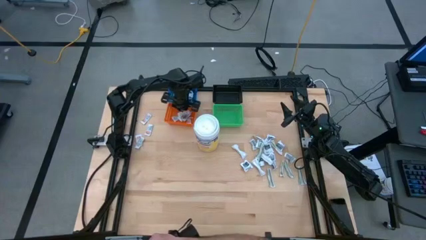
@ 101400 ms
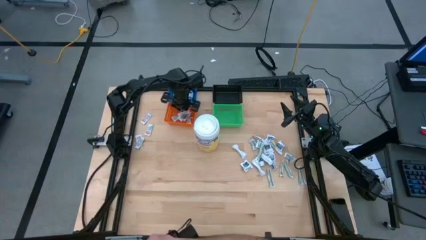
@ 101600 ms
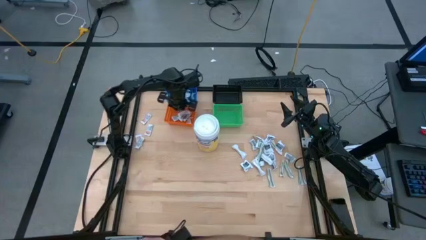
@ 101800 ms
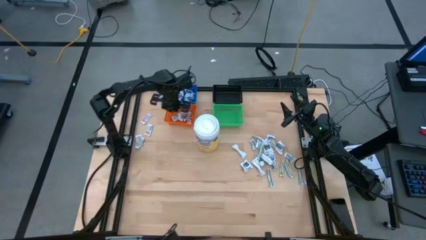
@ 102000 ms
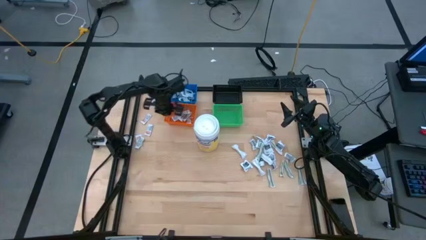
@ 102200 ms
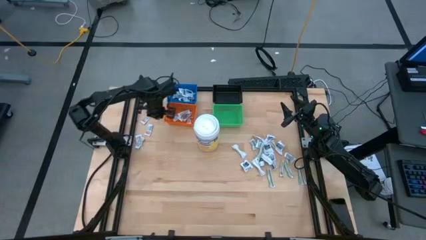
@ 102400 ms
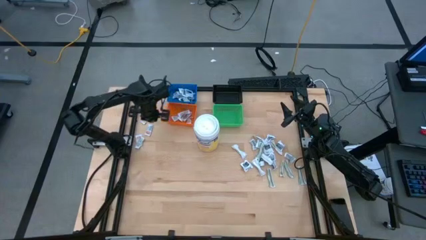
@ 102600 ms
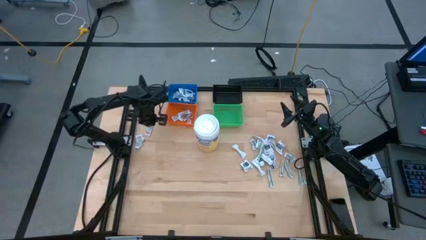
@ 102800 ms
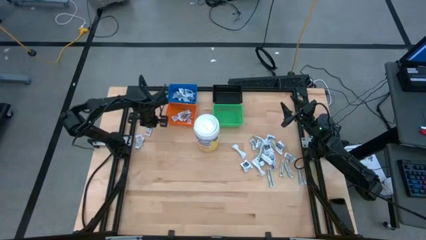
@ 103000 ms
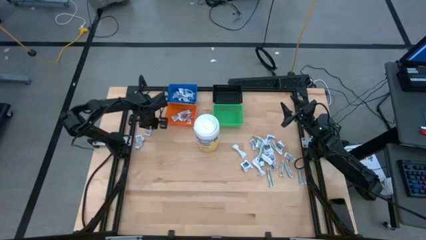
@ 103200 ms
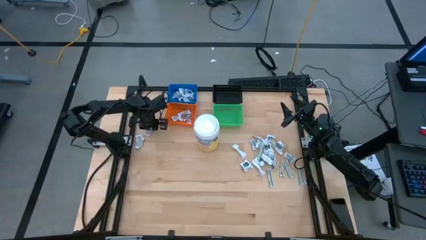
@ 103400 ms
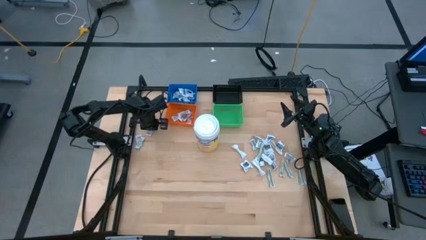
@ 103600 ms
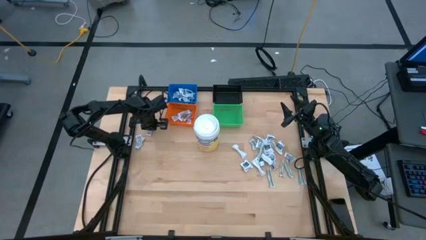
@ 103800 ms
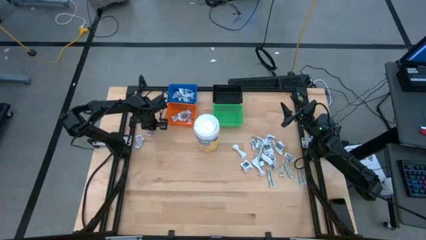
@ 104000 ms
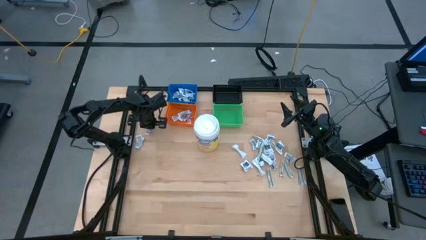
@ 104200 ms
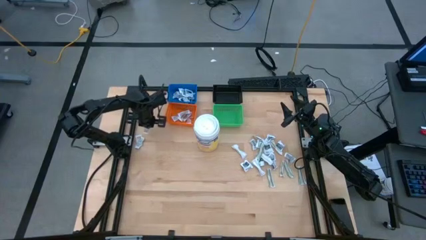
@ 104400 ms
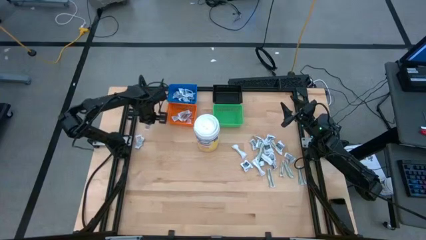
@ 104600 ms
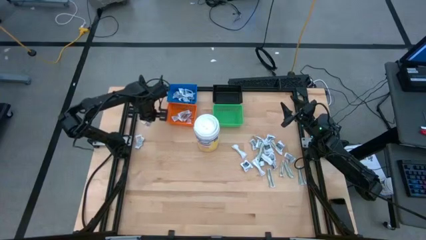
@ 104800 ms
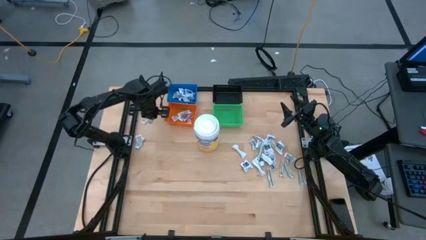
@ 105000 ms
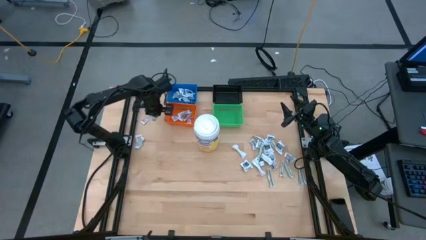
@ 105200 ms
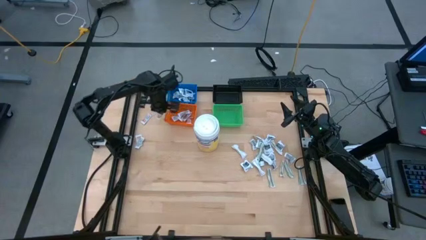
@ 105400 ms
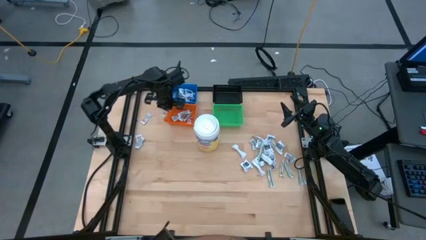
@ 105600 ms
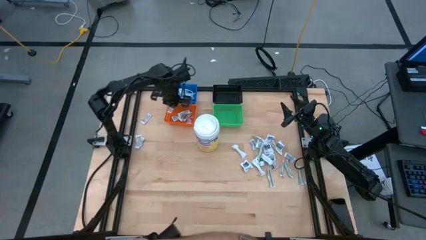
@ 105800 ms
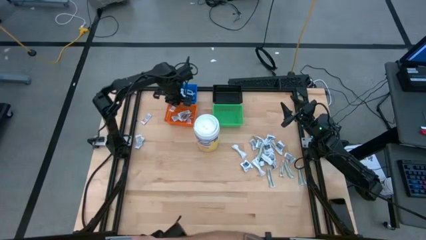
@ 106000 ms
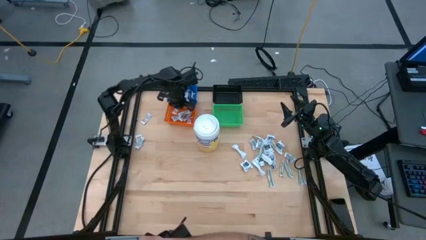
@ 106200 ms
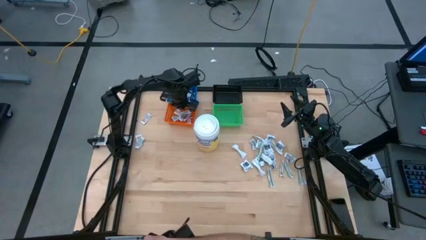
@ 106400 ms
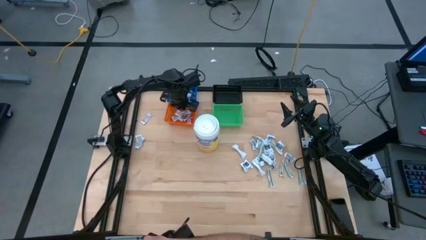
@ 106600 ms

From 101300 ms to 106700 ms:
Task: Pick & Place First Aid Supplies
Put the orange ointment pack into the orange bin

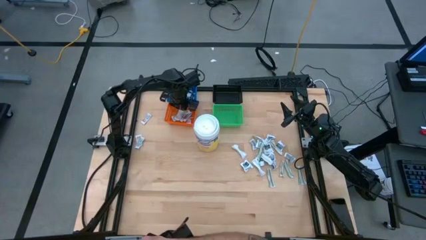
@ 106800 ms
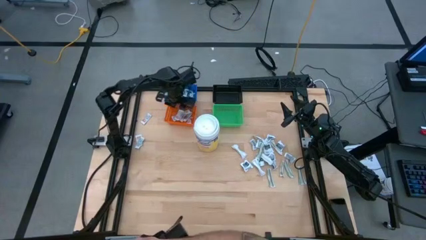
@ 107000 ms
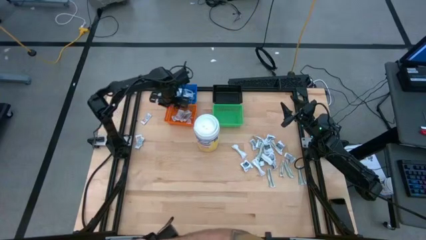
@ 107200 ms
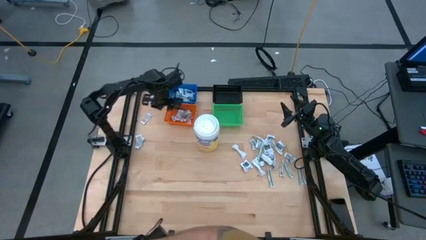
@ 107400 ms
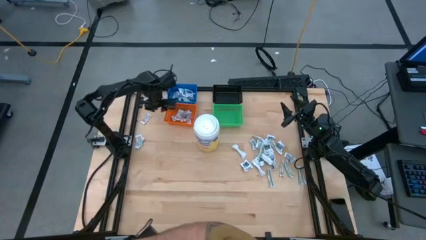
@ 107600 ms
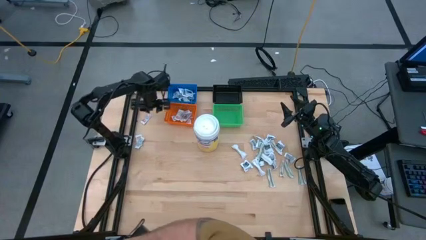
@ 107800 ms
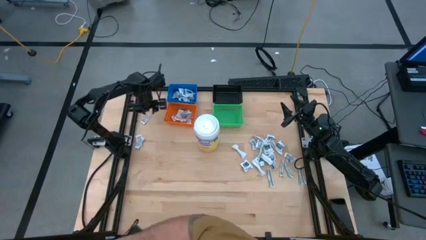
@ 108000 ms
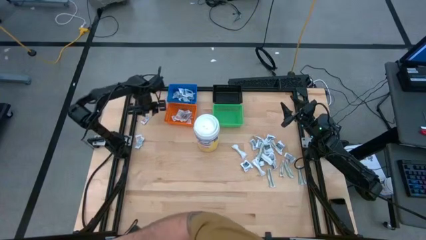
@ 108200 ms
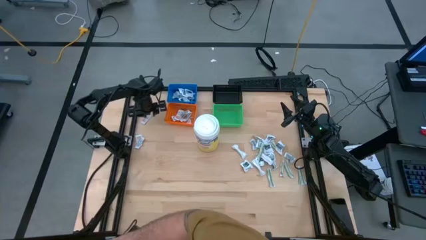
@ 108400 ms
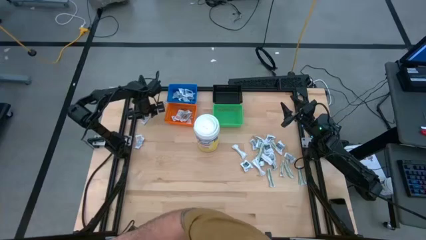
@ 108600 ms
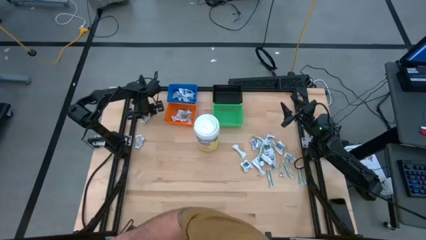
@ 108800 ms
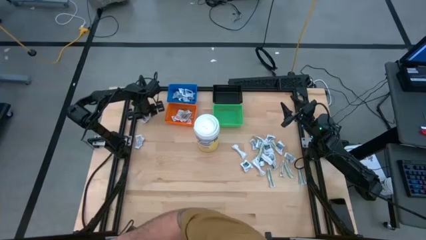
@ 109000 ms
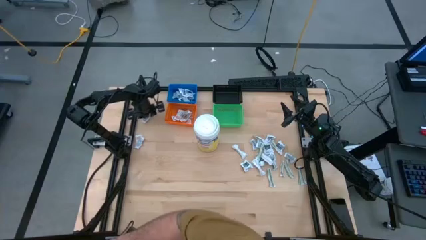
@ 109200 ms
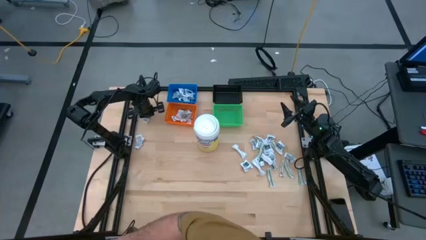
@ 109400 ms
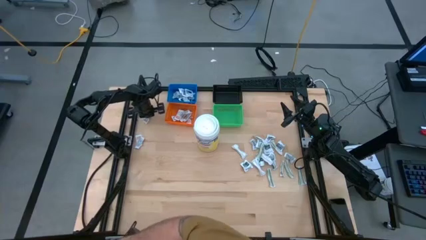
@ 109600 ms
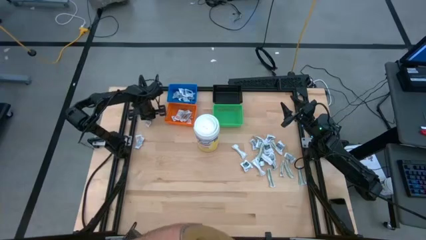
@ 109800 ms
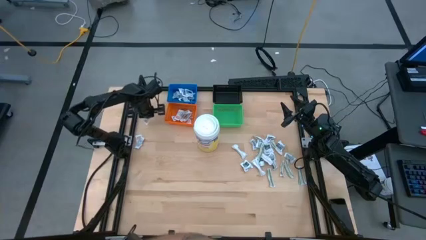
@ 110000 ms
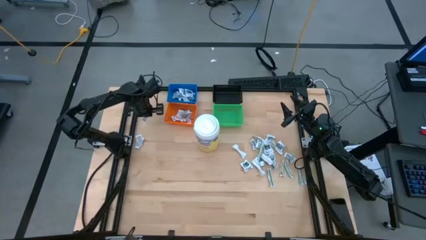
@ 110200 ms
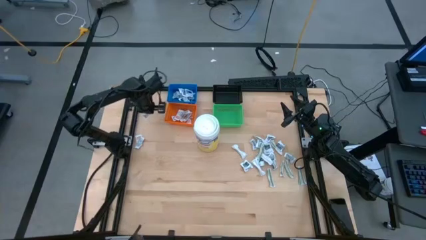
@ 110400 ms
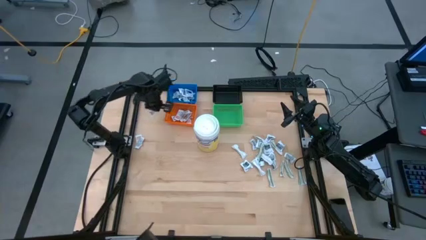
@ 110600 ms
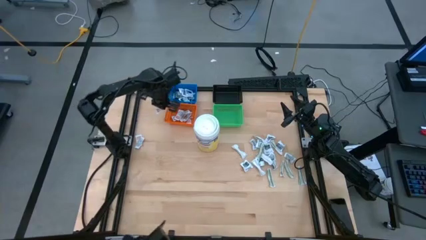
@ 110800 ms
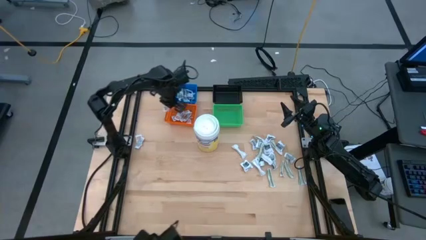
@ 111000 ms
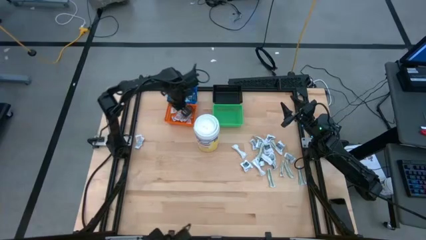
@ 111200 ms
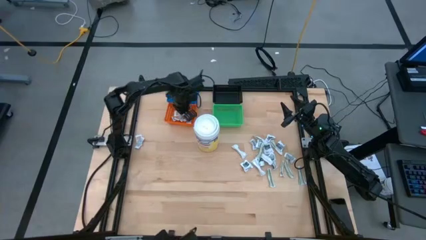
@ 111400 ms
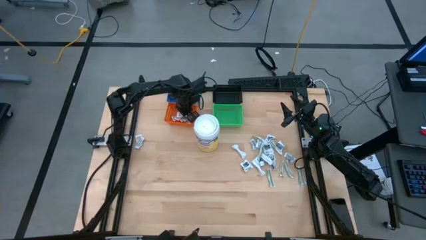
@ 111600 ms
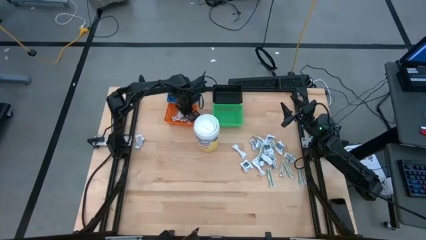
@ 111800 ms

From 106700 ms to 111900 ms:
Put the orange ointment pack into the orange bin

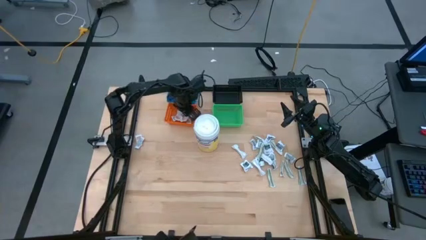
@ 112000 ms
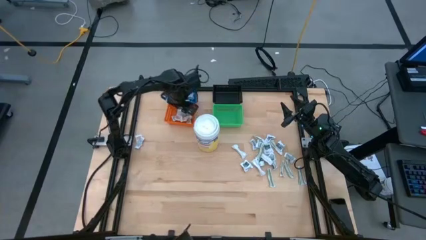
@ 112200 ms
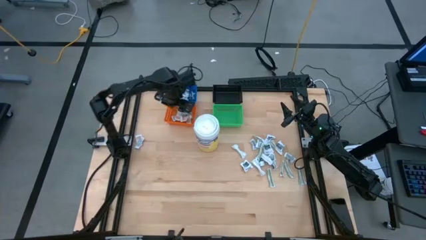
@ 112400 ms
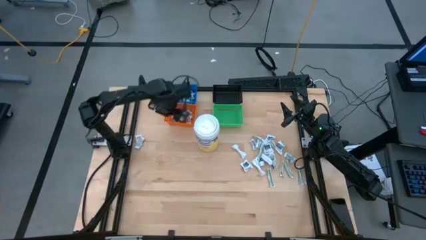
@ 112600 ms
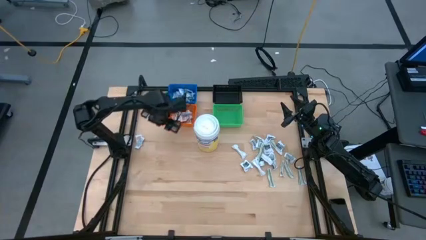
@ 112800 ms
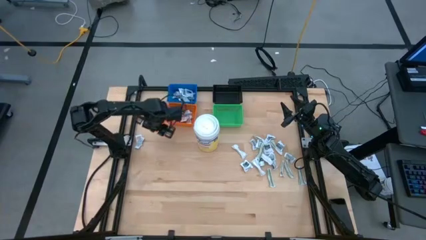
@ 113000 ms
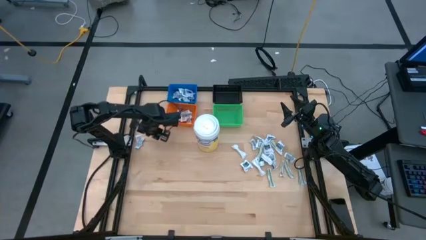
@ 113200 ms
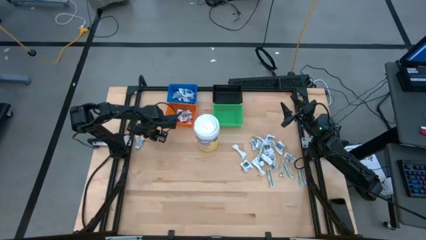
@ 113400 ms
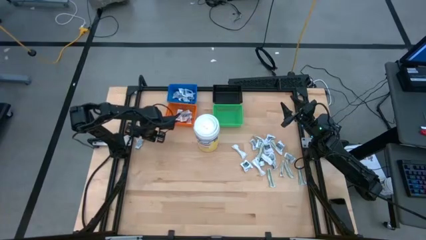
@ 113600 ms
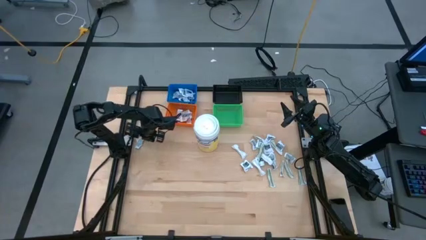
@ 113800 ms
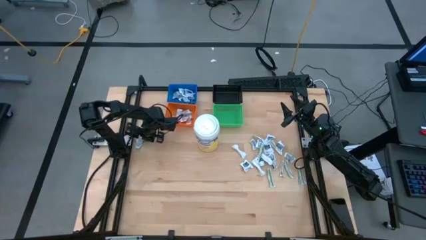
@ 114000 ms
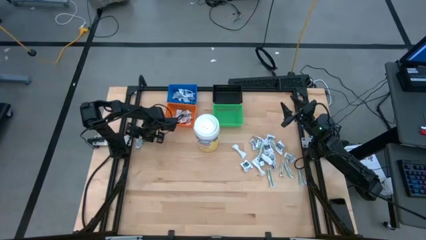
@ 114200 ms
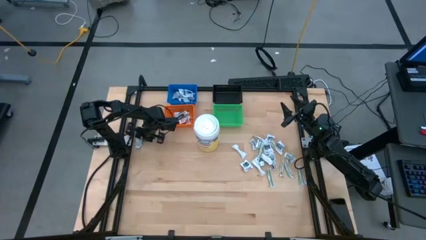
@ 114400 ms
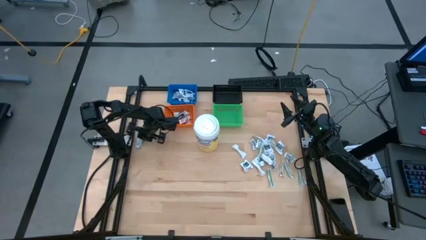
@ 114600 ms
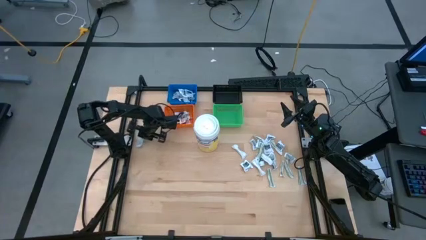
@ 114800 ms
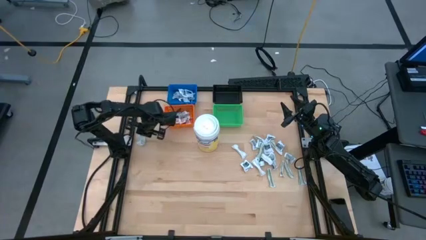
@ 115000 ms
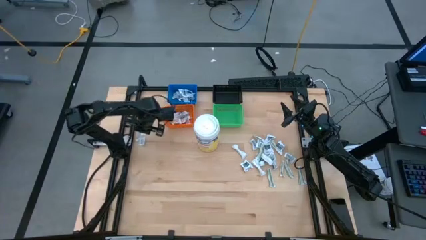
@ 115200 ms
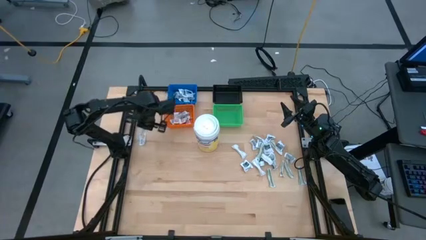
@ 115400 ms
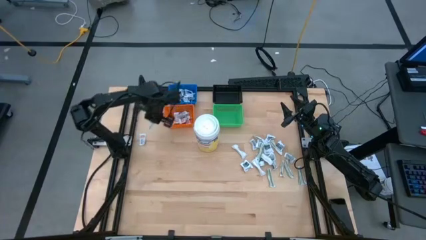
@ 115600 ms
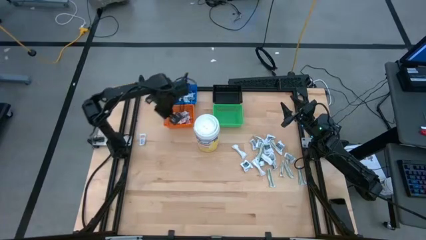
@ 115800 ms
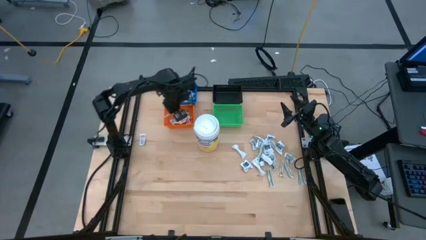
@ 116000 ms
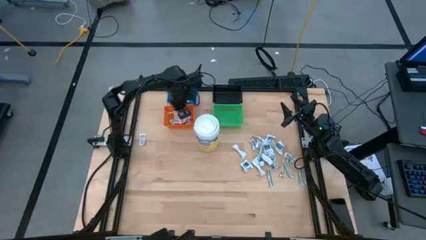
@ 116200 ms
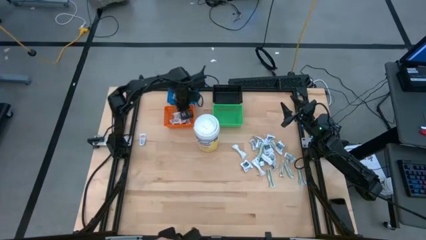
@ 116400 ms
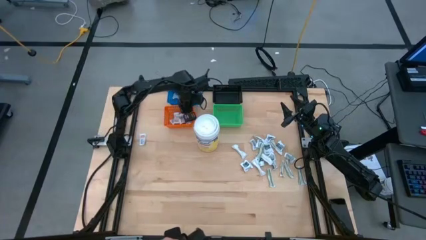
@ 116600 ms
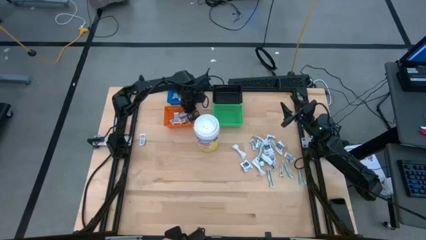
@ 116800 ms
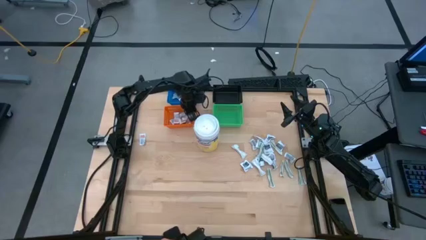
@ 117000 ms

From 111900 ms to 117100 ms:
Put the orange ointment pack into the orange bin
